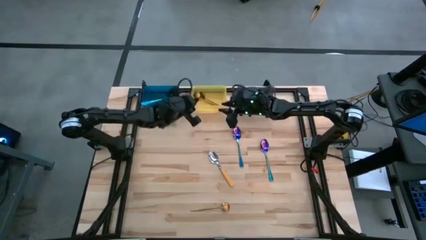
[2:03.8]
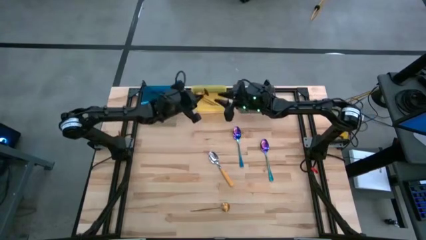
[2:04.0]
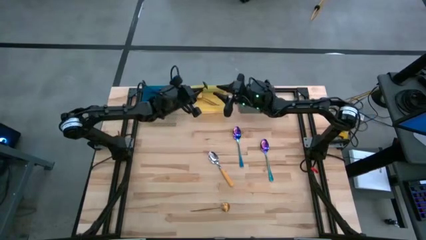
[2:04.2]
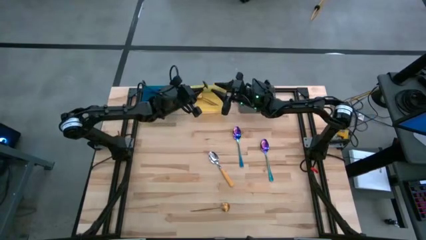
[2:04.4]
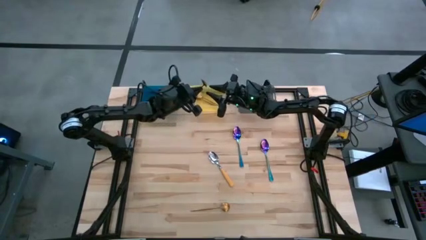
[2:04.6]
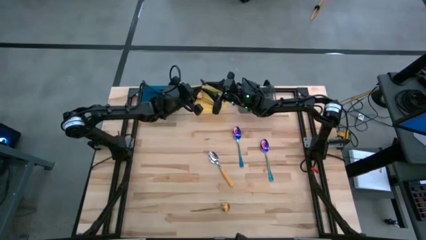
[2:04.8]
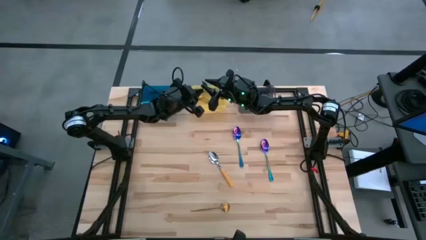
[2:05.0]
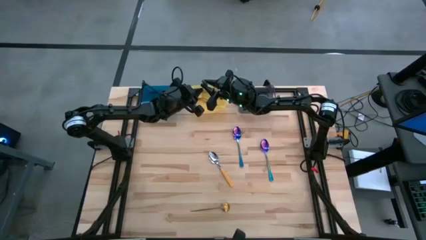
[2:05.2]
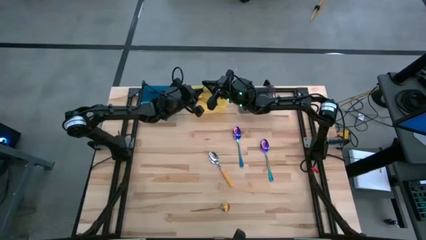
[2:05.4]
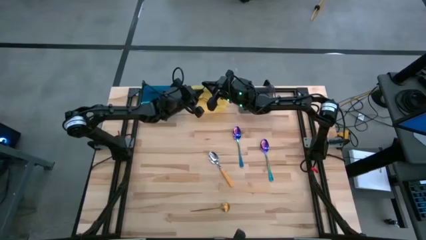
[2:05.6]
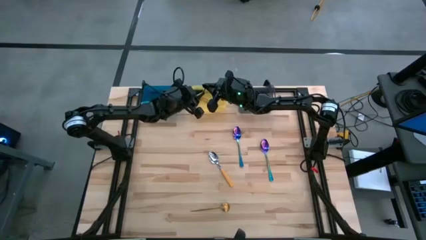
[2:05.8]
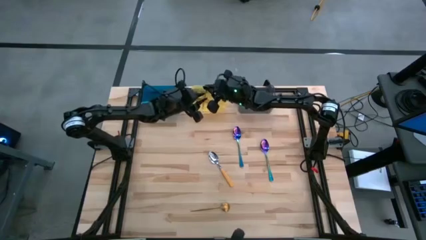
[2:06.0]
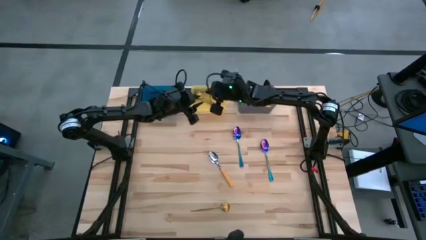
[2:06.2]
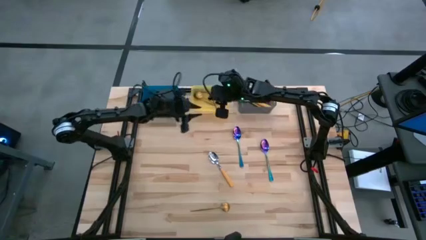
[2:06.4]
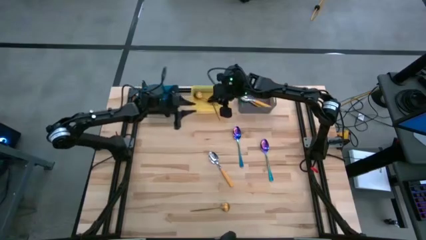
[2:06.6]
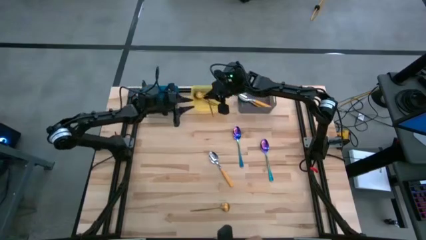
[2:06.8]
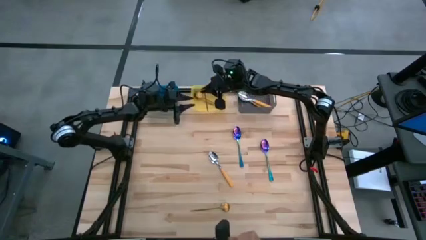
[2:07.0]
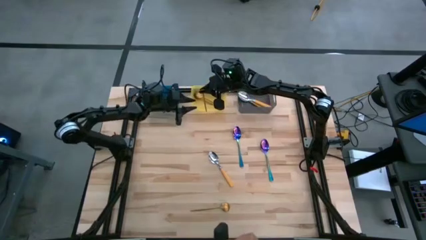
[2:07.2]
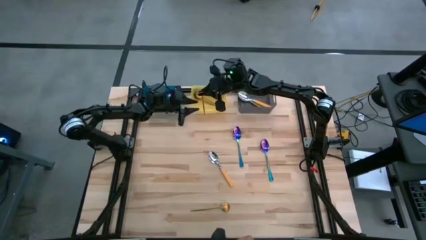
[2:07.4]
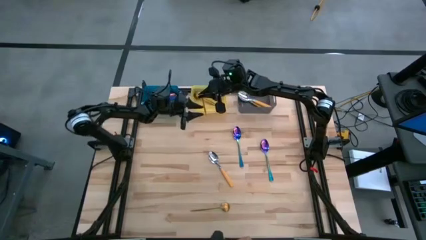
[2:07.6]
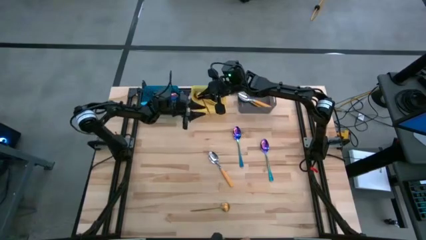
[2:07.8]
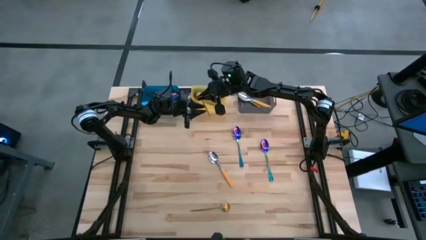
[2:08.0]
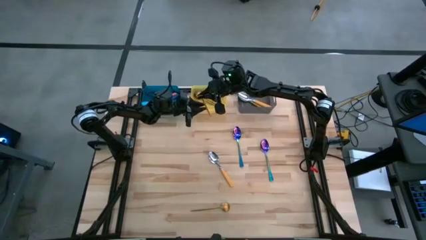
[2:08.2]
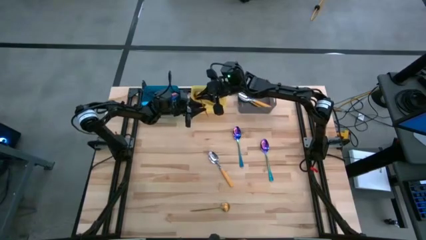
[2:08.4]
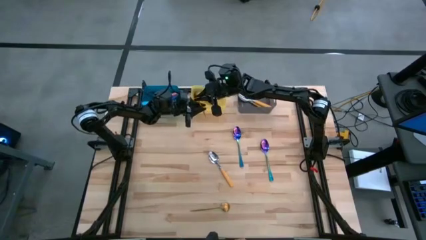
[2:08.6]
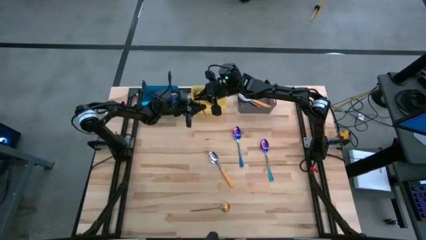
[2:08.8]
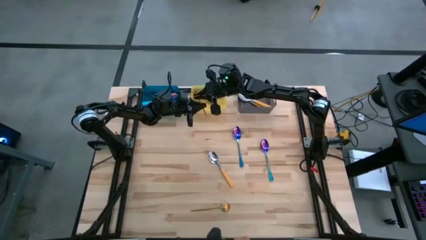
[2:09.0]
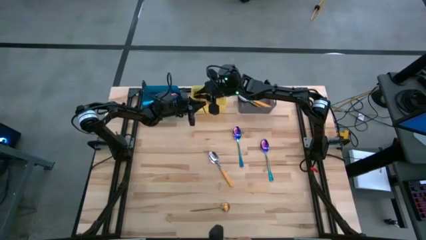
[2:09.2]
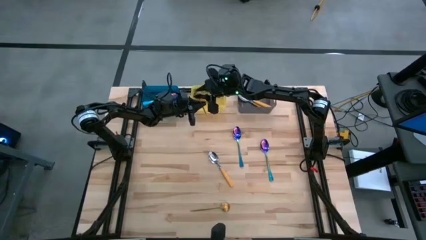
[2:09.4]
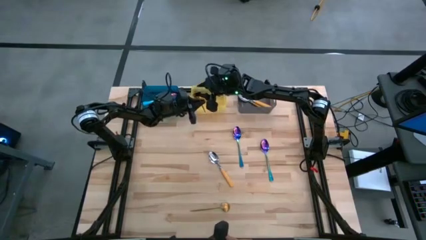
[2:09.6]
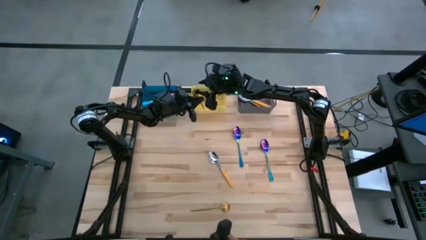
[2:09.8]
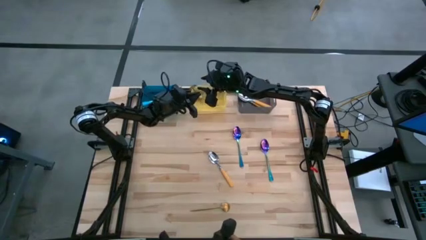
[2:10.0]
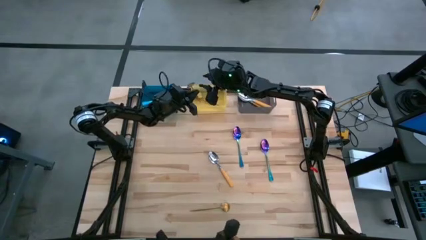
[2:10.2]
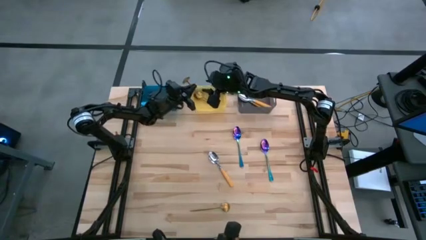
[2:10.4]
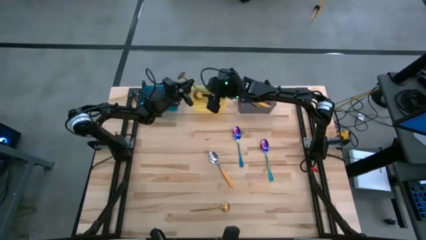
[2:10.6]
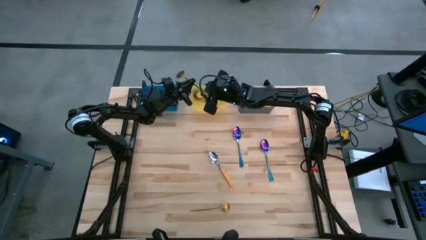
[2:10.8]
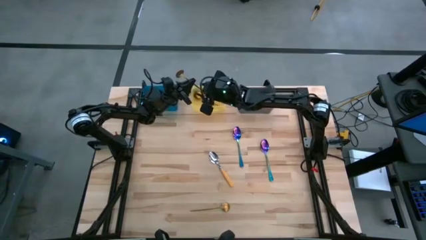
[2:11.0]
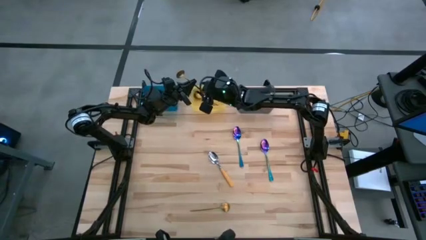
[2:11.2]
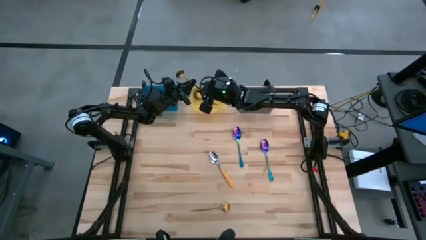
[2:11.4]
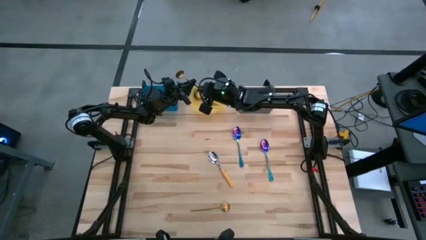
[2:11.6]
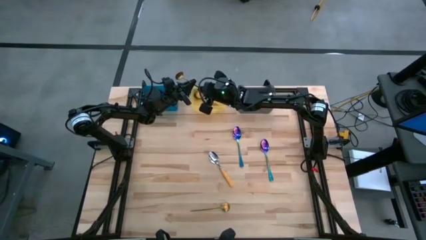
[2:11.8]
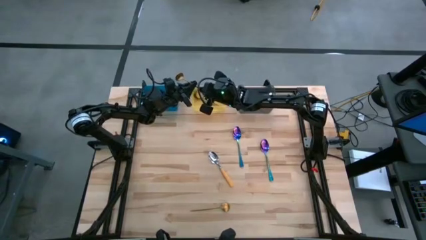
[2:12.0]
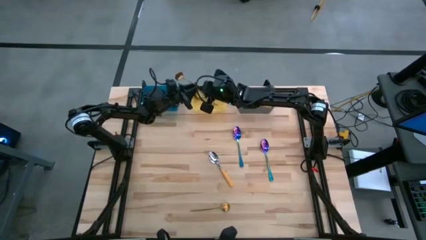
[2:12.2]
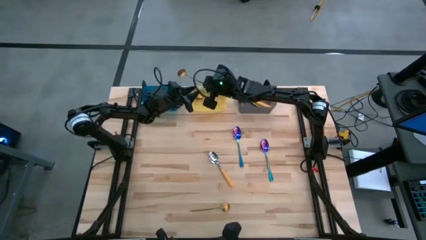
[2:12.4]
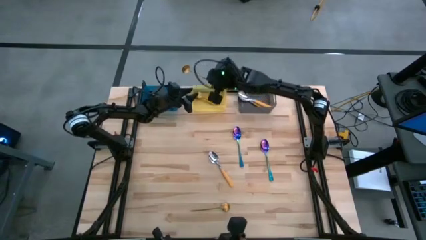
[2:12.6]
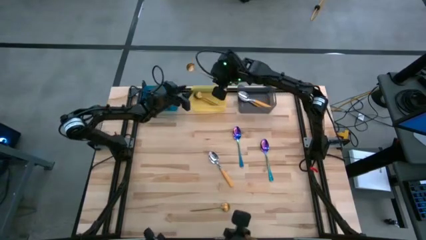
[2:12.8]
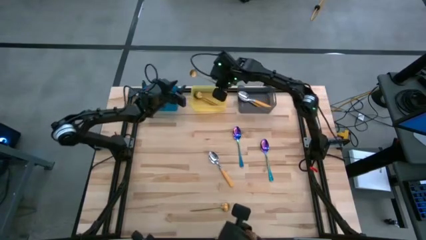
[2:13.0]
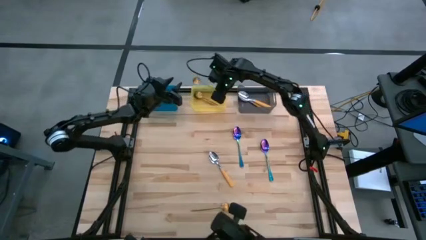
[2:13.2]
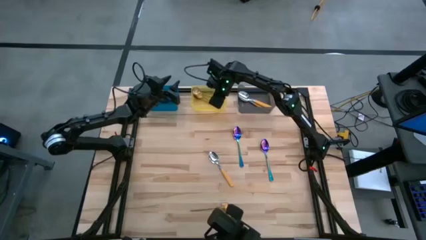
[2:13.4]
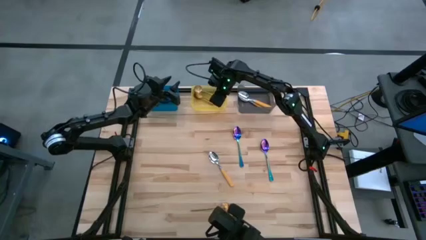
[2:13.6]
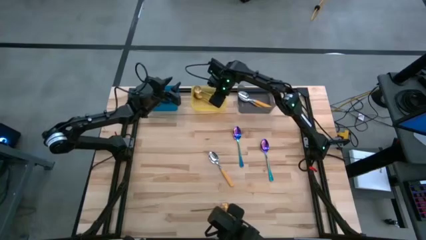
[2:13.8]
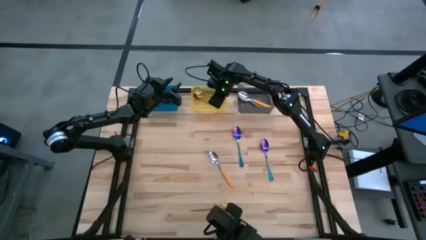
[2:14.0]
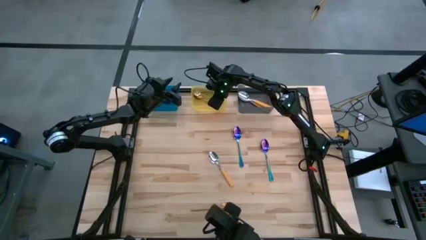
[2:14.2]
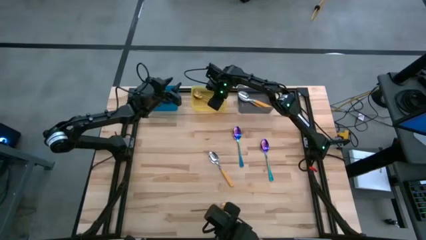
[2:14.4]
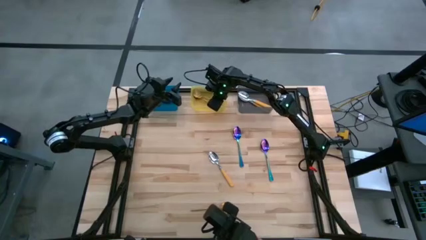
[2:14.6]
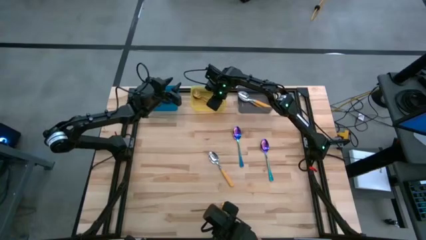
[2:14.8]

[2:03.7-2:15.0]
Task: Sort silverware by color (type)
Put the gold spoon into the yellow bin

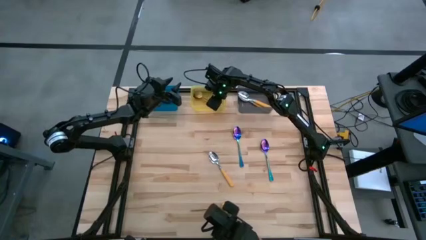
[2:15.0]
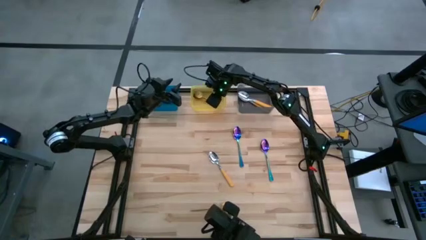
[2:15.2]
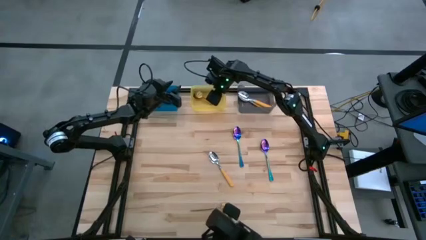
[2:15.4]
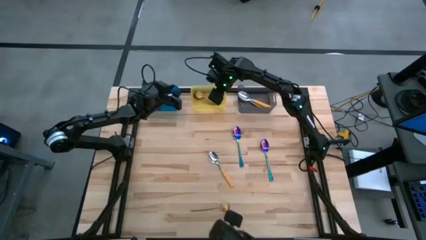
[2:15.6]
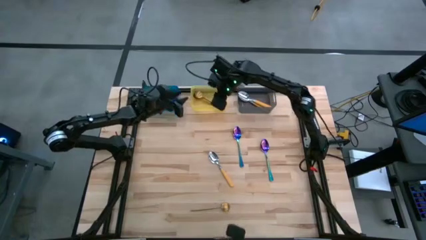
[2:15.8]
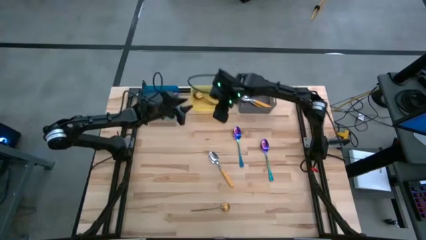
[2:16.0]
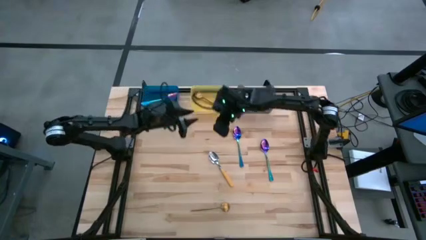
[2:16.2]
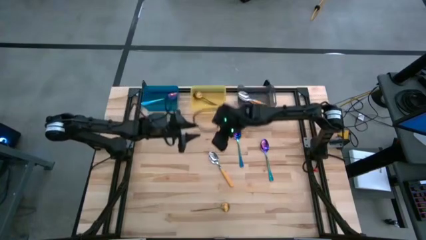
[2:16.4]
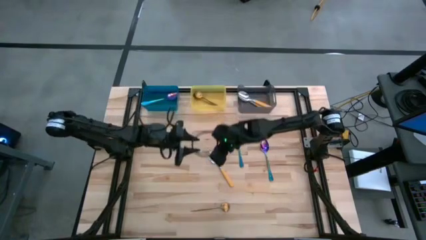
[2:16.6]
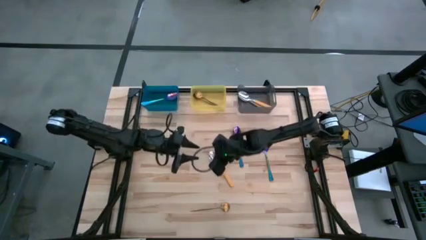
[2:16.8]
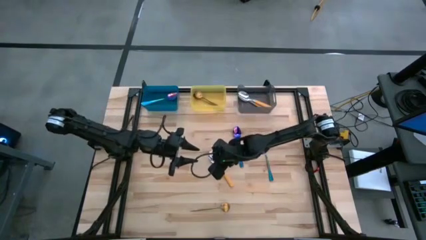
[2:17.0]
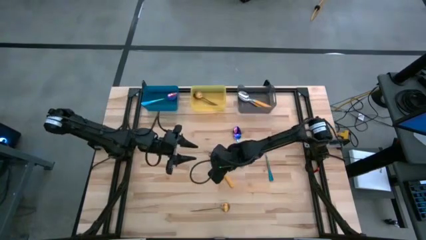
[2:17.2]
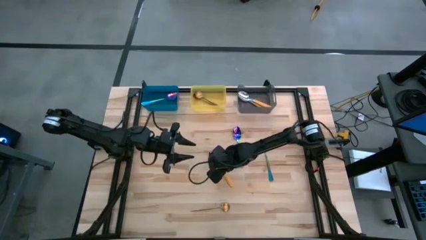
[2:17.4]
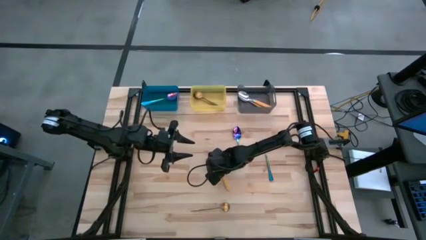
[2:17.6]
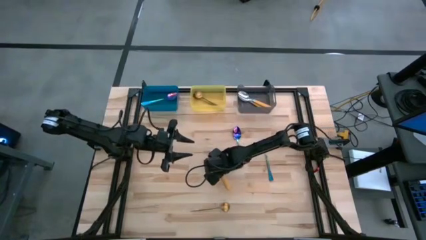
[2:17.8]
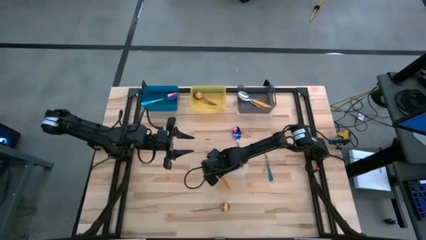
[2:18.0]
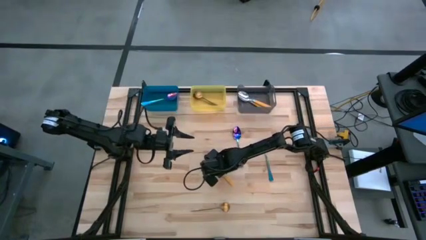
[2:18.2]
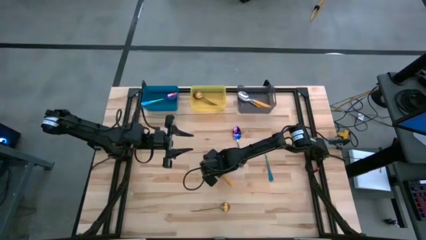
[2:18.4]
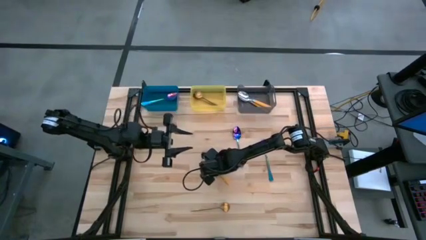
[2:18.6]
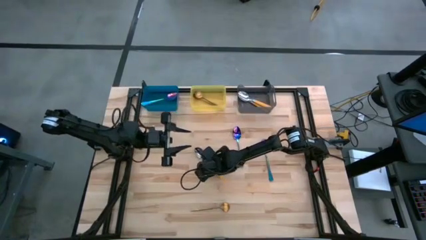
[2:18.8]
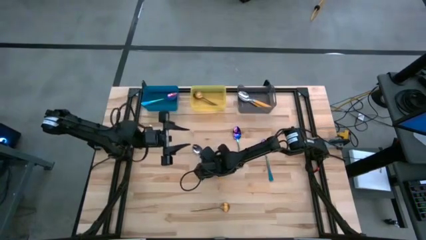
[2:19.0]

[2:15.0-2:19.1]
Put the yellow spoon into the black bin

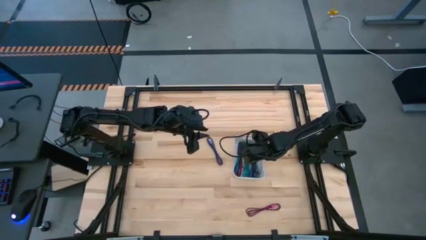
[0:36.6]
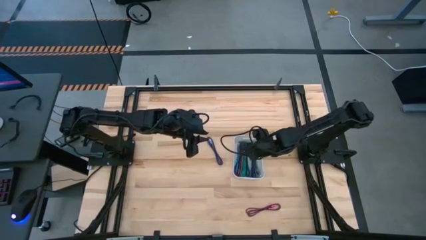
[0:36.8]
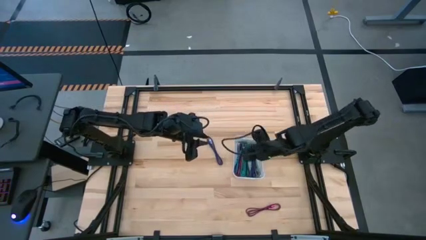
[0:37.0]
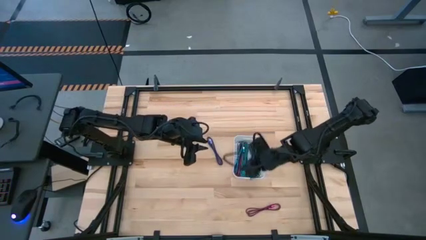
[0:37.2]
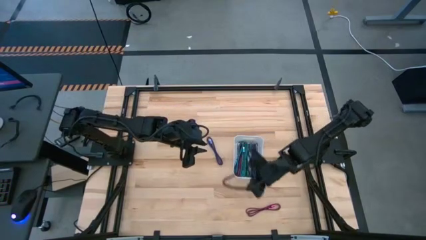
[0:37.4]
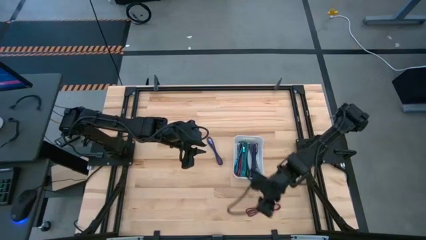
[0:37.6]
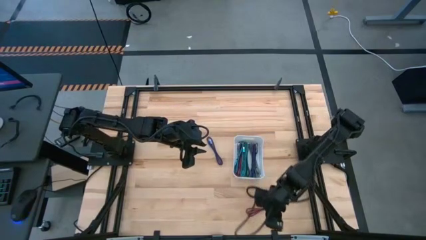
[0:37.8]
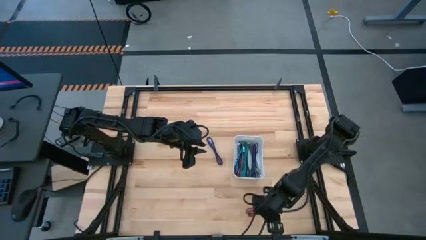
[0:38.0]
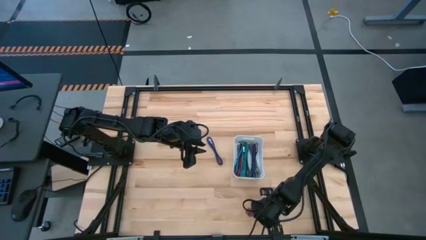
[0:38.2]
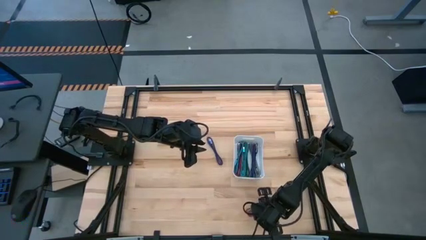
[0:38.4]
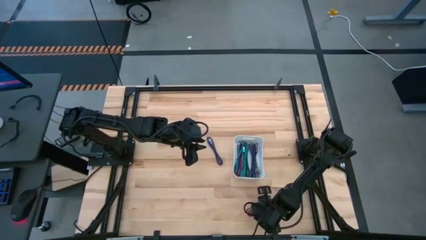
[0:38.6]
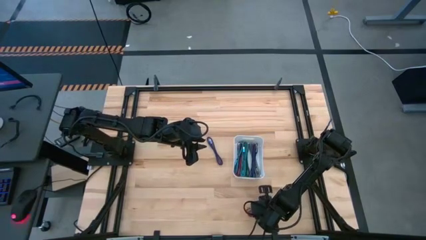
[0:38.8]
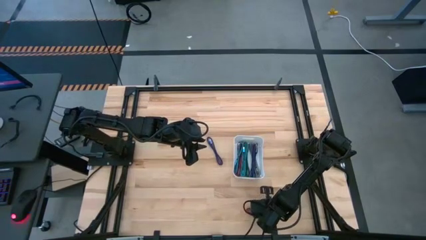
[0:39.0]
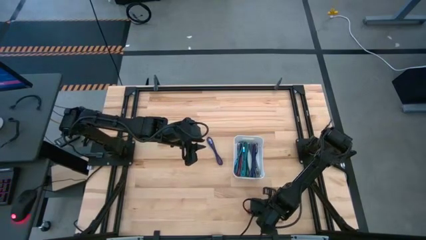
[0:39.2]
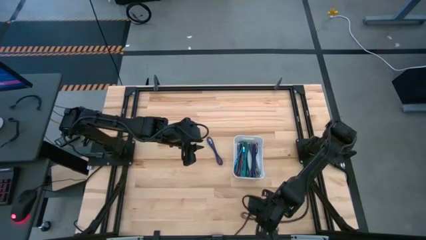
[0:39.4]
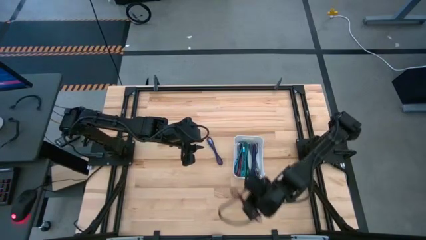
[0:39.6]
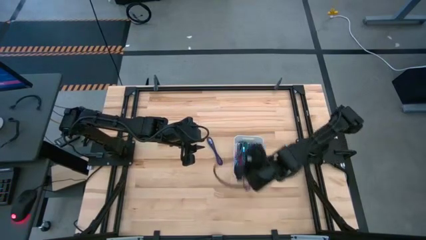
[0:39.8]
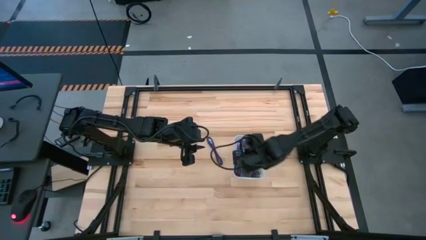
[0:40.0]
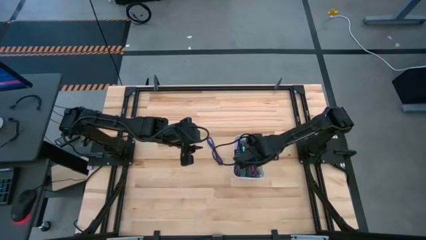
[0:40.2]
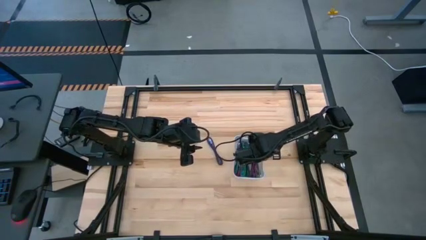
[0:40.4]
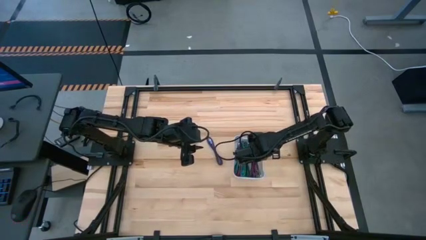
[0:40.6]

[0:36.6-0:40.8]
Task: Pick and place USB-C Cables
Put the pink charger cable into the white bin
